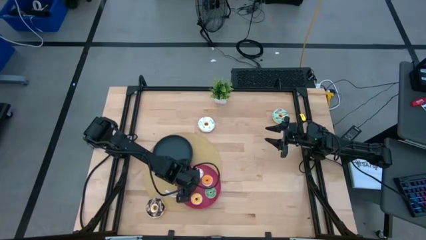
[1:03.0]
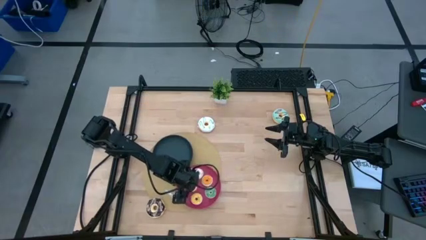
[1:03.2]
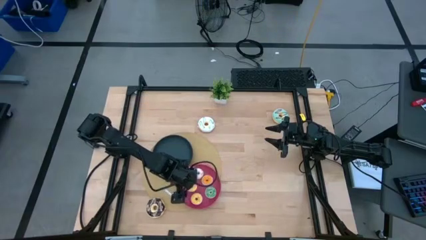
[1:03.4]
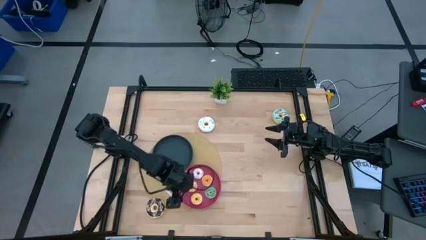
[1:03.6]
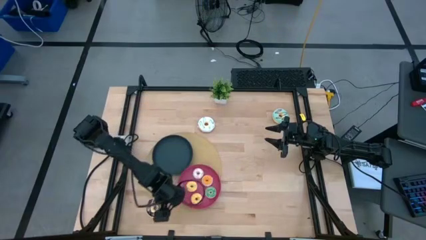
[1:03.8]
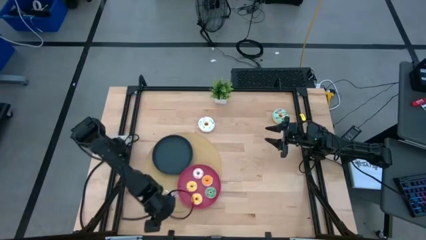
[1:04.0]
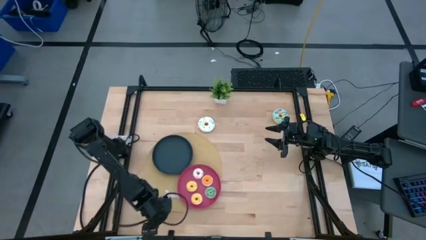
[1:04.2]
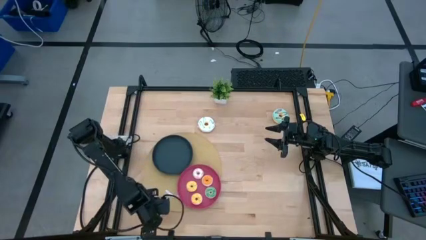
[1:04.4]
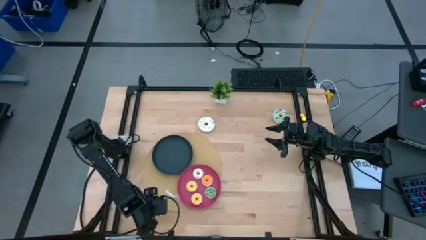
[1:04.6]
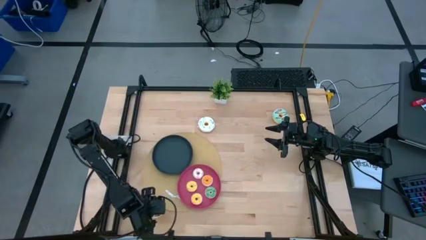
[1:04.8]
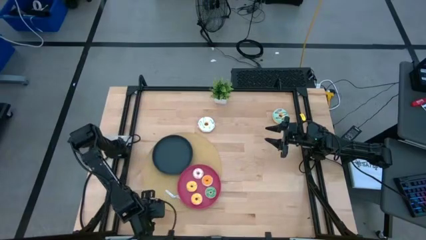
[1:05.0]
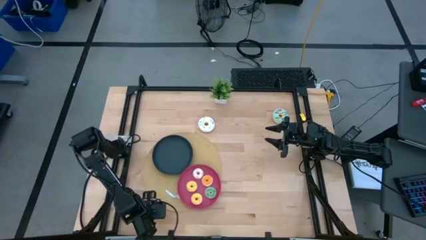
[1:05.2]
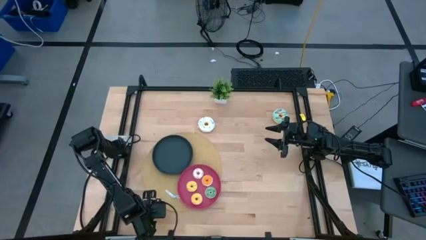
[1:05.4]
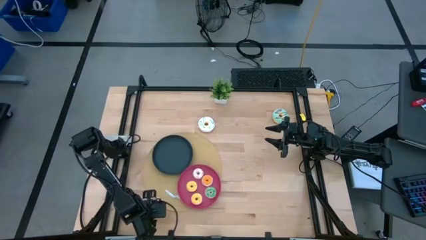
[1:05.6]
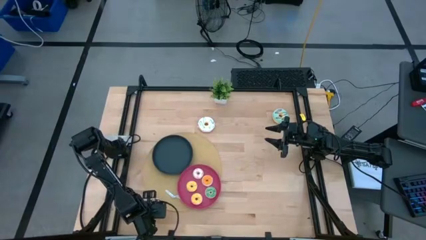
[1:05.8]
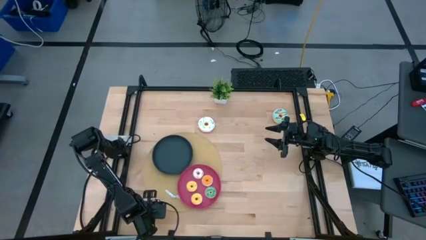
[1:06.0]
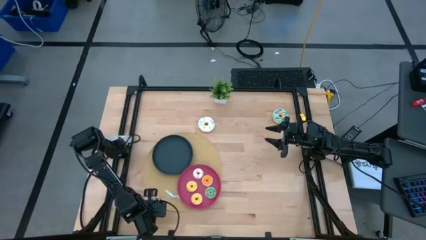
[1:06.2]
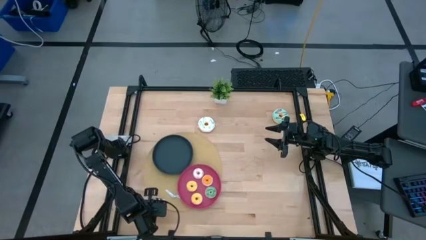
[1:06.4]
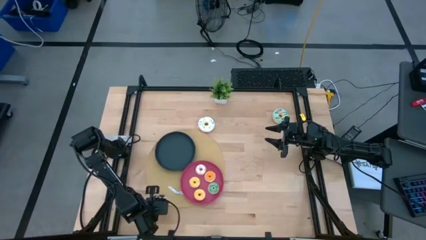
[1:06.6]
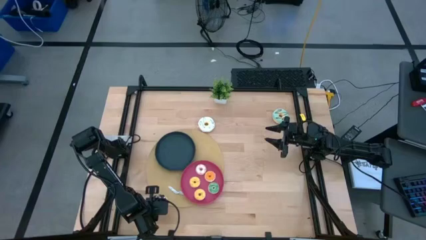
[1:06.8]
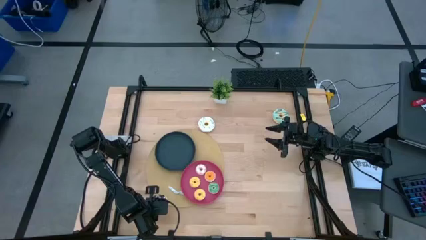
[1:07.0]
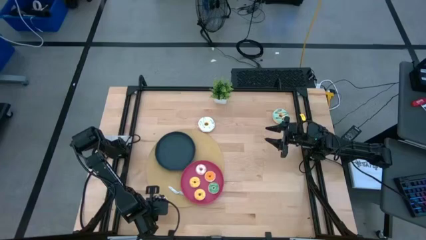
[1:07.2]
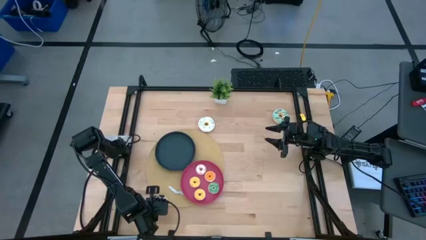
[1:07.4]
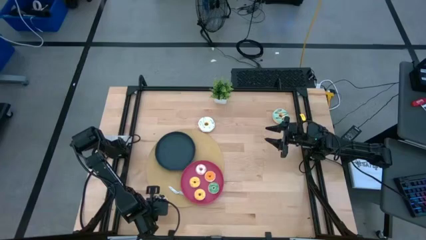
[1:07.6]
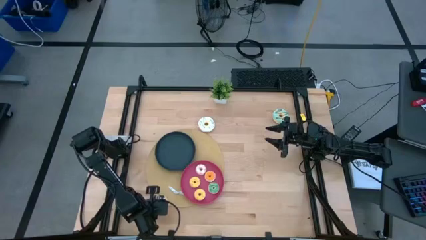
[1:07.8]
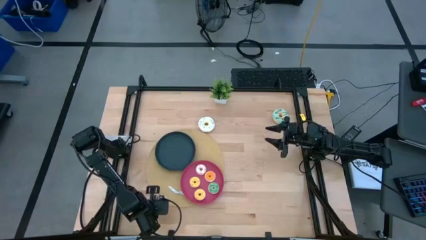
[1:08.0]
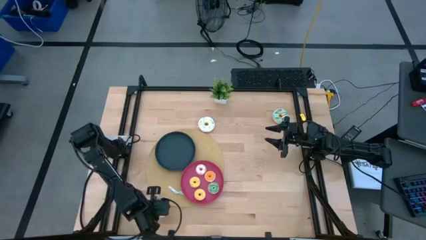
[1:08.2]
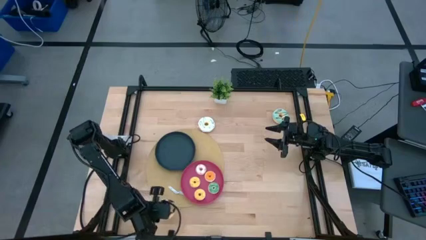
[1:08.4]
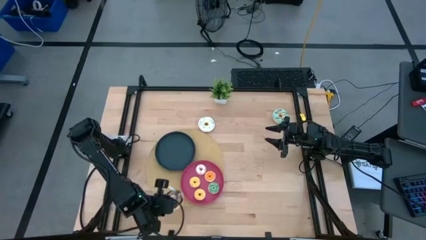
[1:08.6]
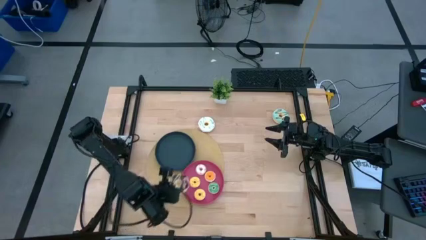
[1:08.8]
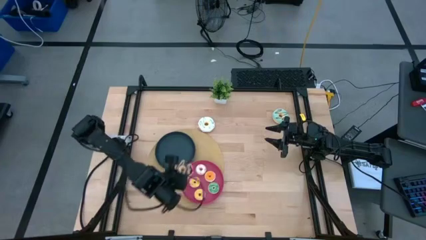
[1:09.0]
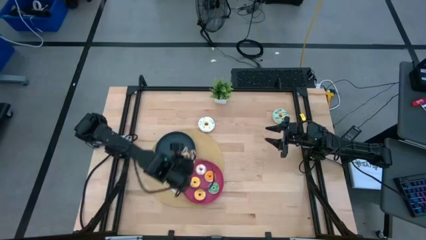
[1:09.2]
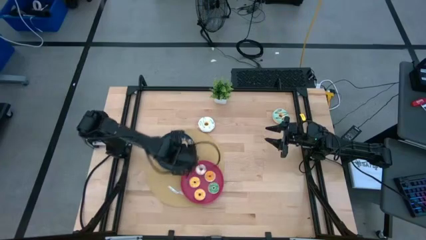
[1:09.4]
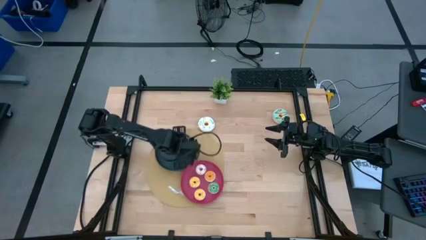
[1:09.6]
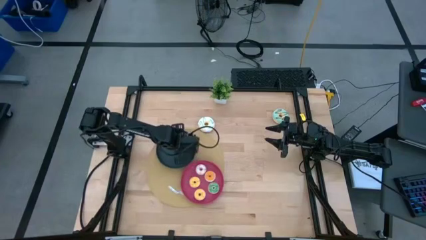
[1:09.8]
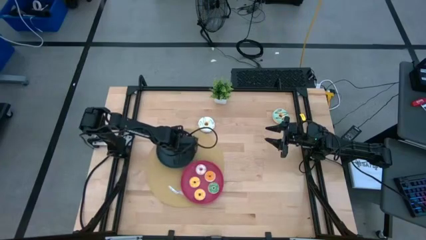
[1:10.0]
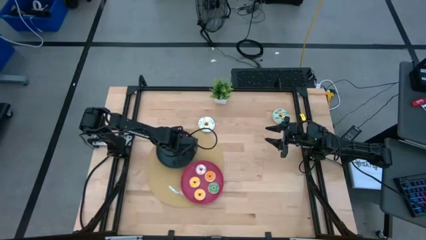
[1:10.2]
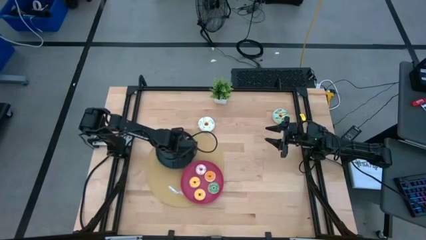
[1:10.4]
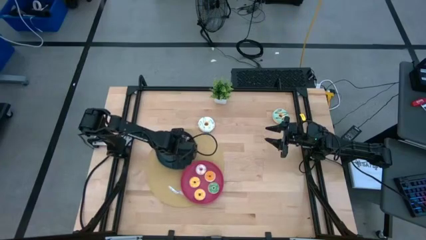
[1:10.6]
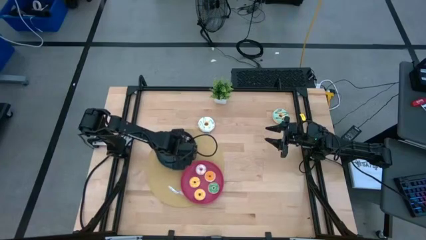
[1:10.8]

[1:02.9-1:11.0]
Task: Pick & Place donuts
Put the large black donut into the black plate

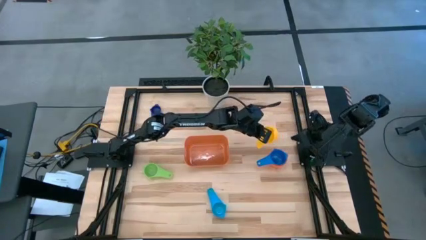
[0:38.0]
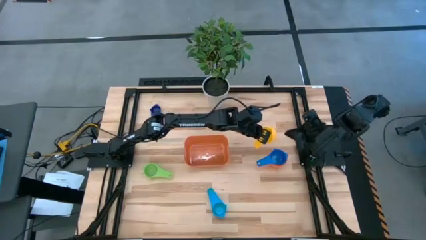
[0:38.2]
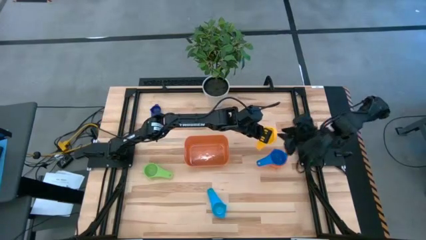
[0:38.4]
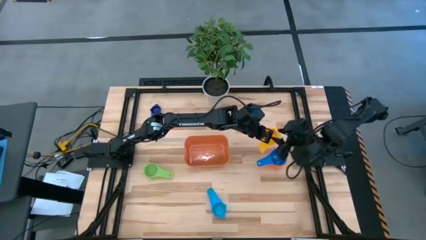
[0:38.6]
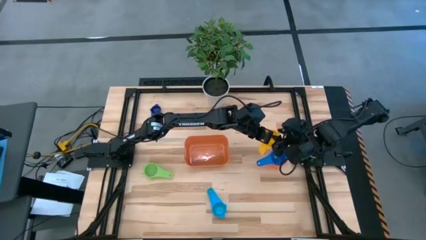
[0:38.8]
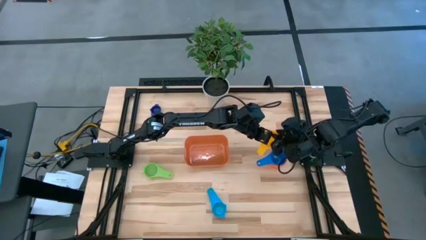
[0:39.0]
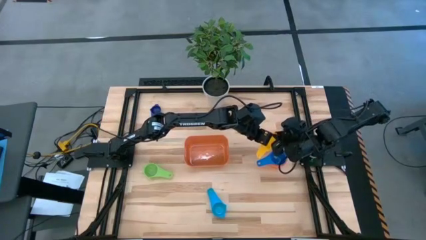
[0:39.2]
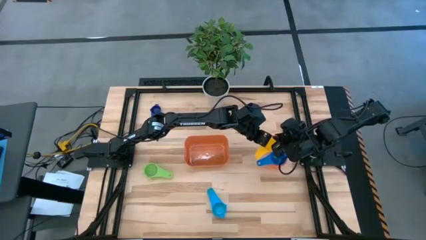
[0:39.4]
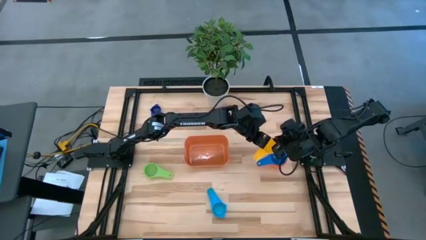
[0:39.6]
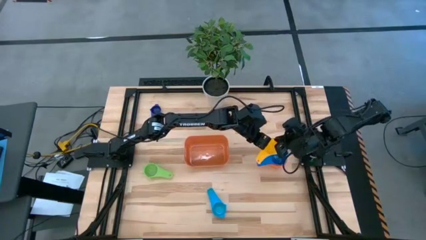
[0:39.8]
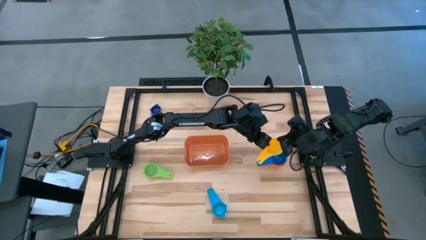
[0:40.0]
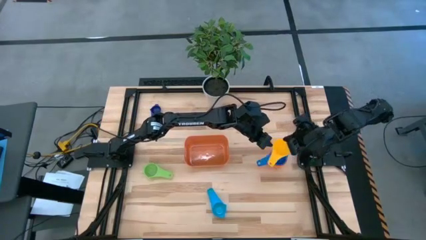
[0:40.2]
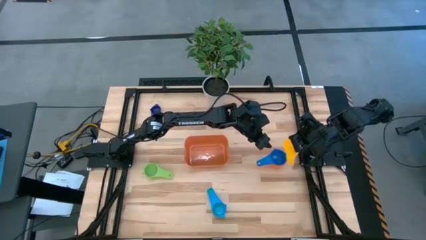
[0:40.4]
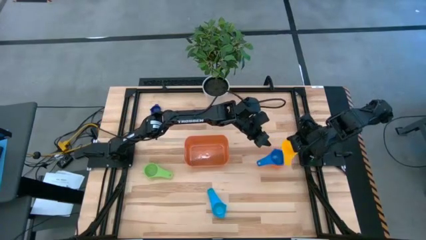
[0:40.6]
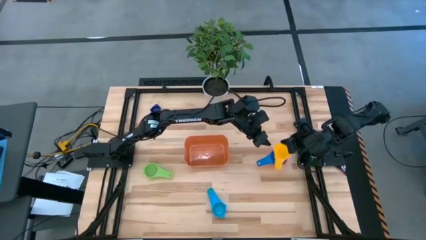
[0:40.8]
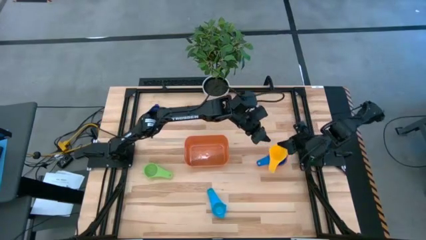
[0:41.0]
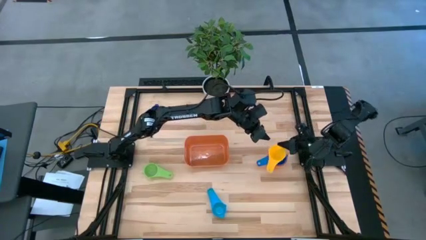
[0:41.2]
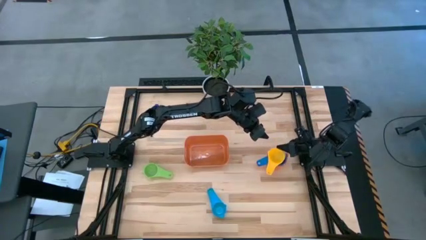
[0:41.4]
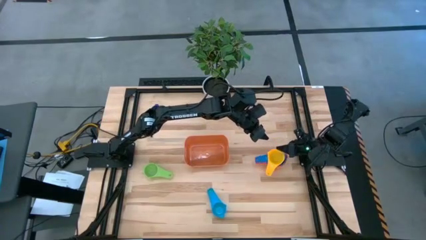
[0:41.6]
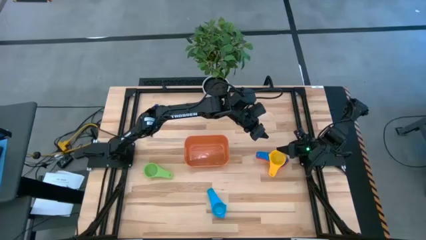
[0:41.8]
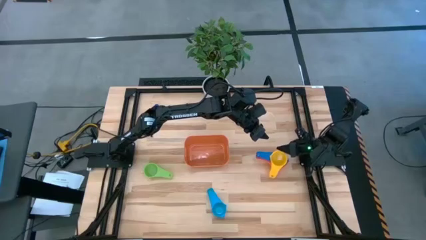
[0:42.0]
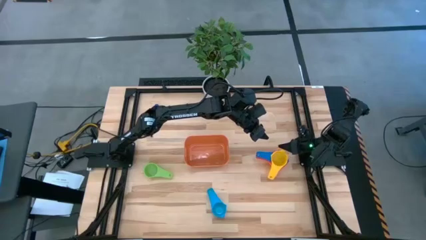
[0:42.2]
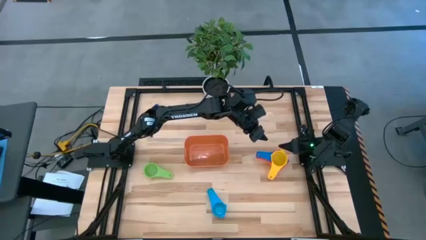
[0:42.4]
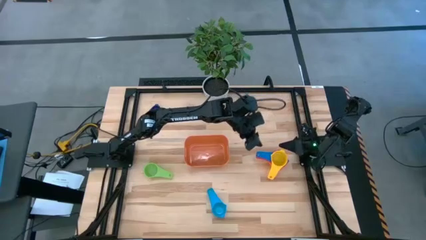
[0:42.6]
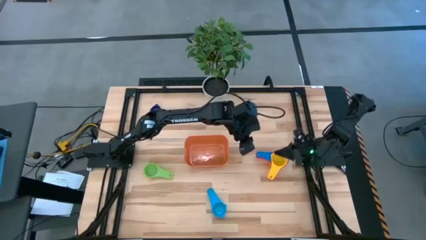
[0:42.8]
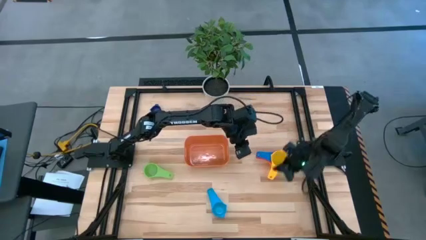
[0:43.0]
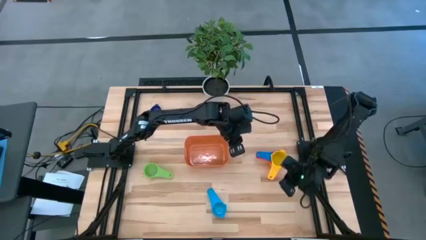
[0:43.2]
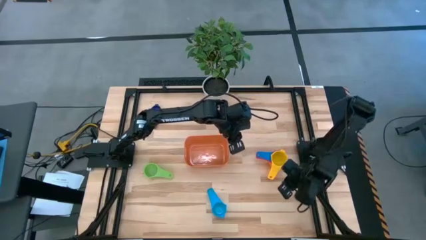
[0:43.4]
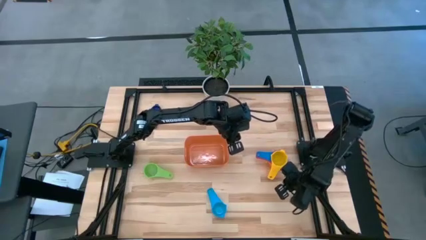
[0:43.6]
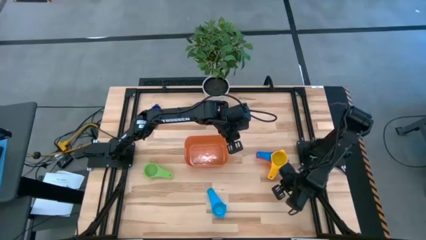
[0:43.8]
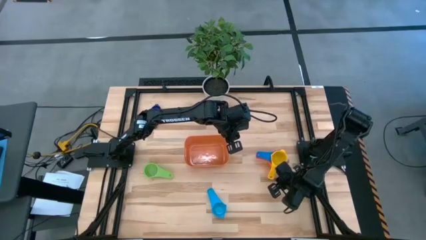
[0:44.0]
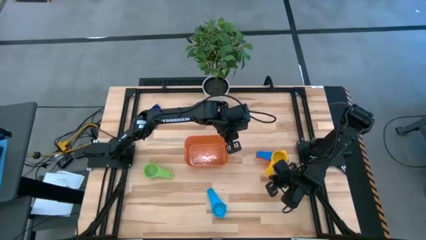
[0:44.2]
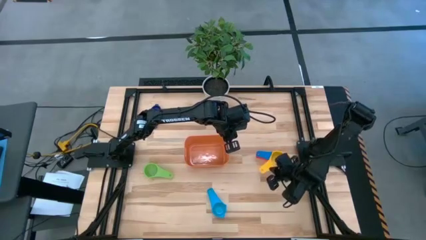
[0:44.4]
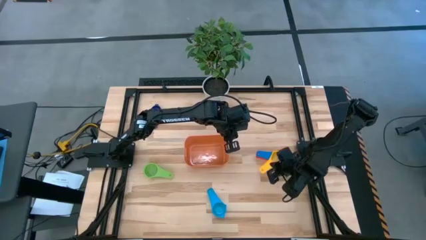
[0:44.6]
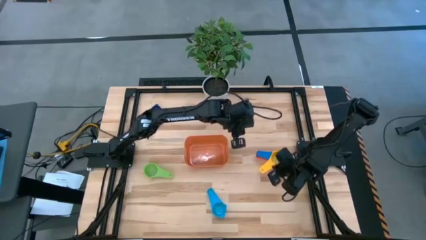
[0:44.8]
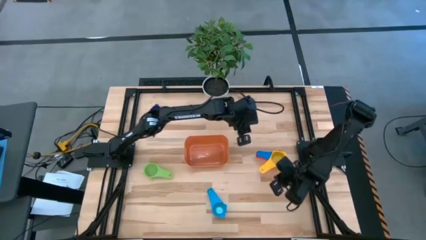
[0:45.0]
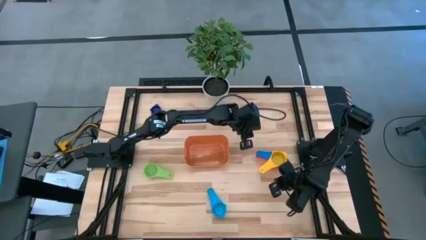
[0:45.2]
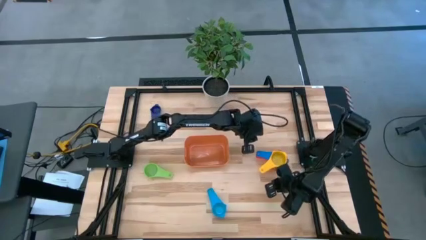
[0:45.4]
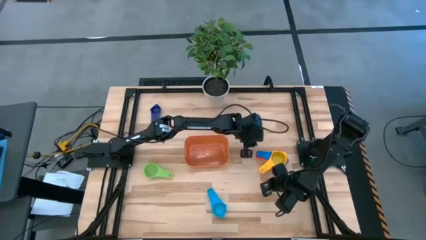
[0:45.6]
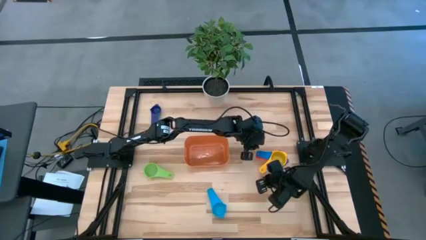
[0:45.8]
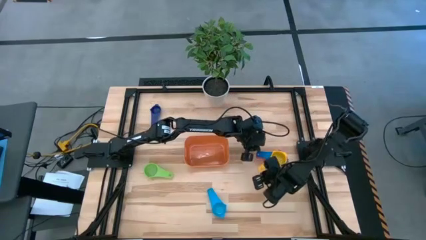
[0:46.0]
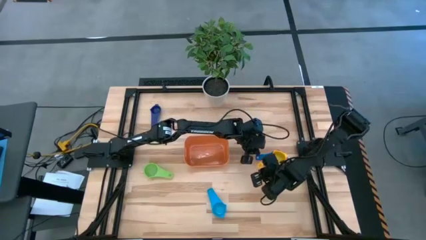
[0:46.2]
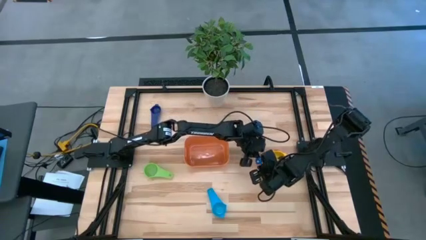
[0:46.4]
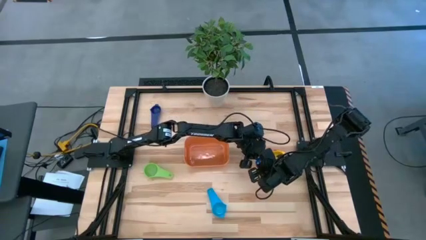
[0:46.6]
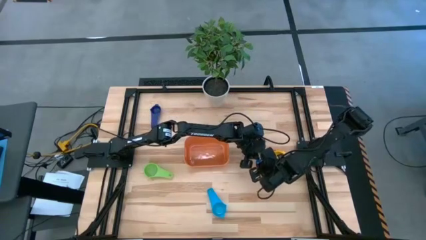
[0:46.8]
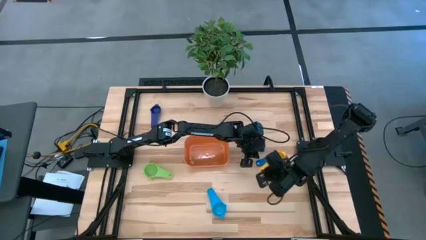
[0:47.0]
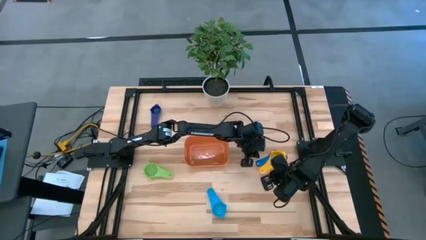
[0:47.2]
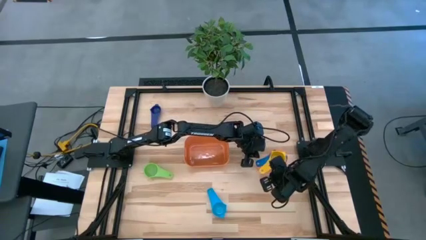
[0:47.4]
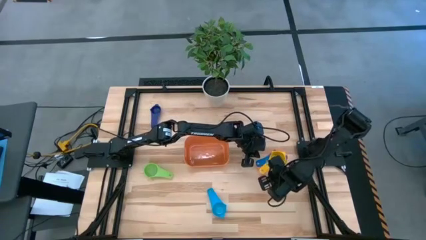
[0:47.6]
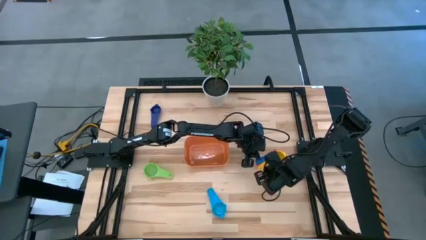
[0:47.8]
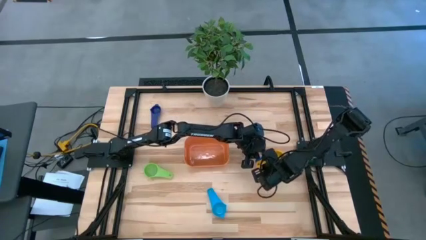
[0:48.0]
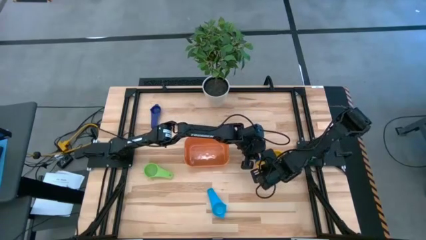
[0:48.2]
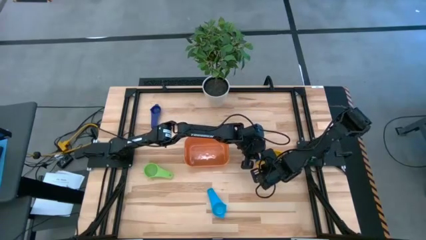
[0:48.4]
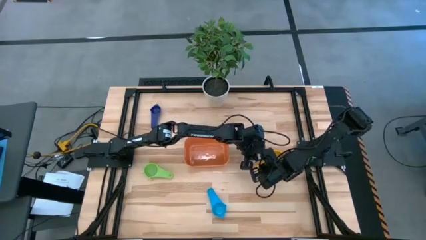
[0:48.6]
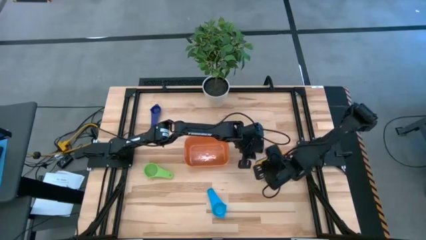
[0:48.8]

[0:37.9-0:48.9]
Task: Nest measuring cups in basket
Stack the yellow measuring cup on top of the blue measuring cup
